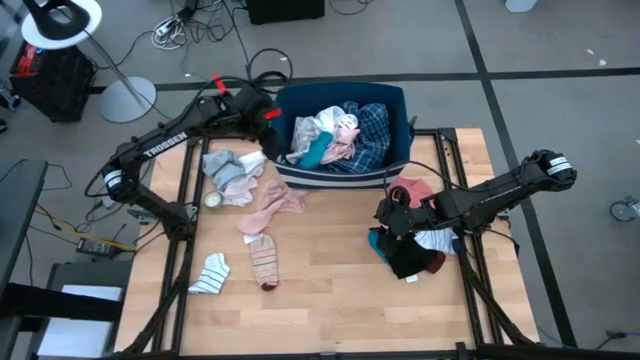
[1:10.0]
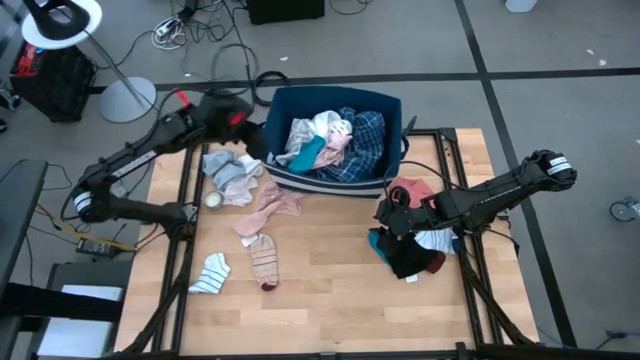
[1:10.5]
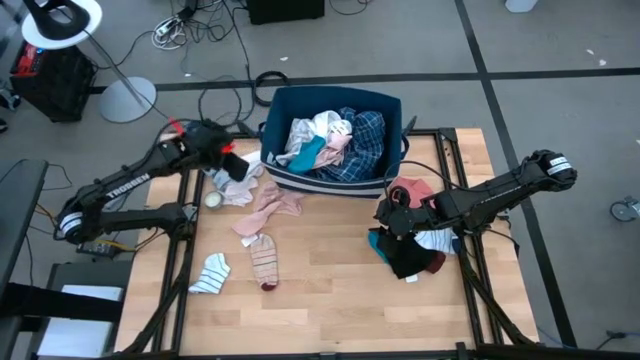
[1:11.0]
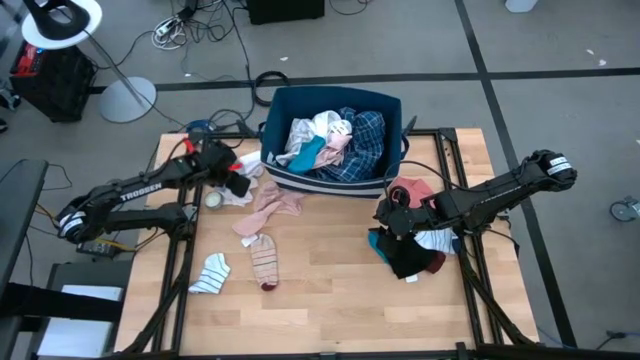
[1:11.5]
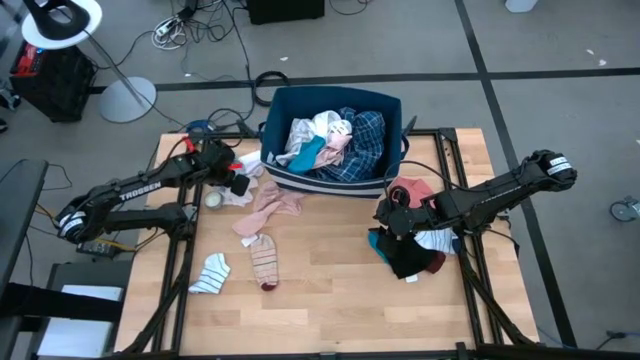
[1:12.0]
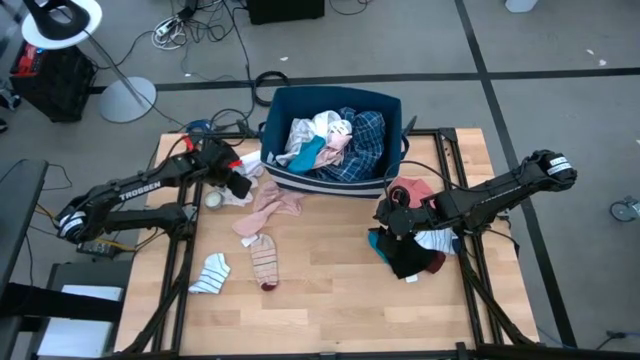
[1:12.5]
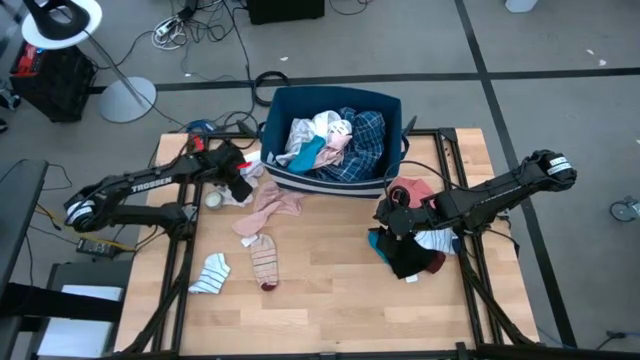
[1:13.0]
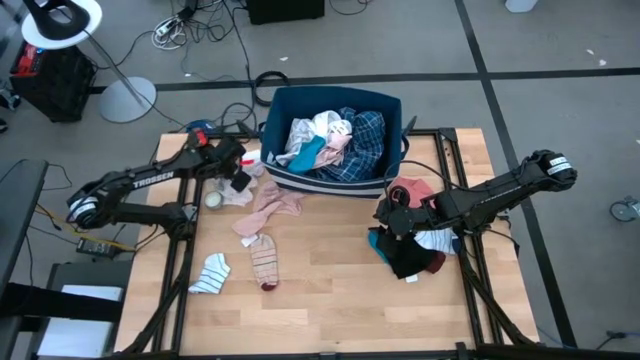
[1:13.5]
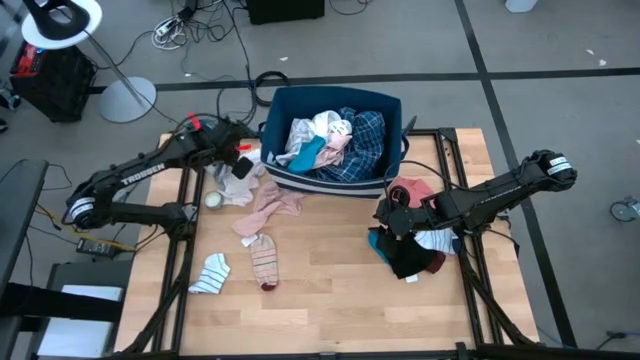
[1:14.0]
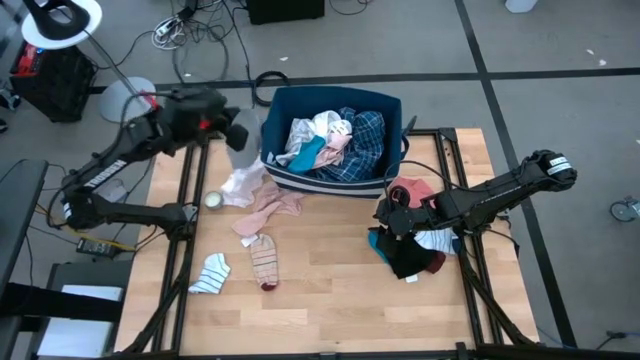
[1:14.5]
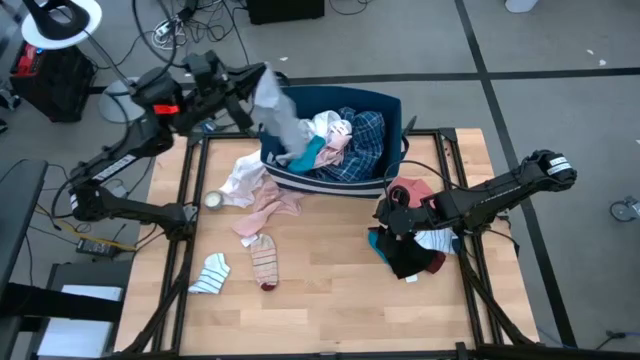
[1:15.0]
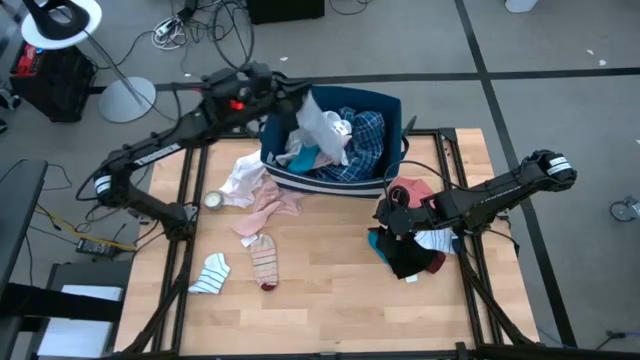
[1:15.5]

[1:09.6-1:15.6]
Task: Sort clothes
Put the gray boxer into the blue bin

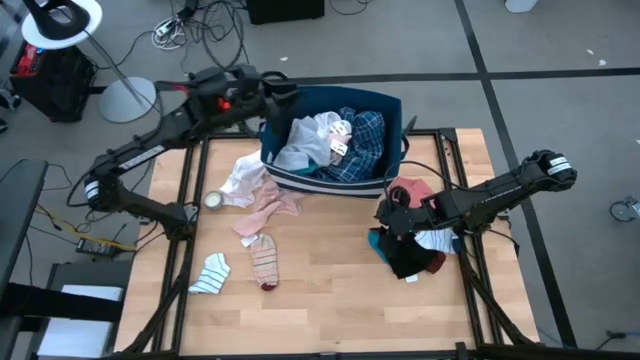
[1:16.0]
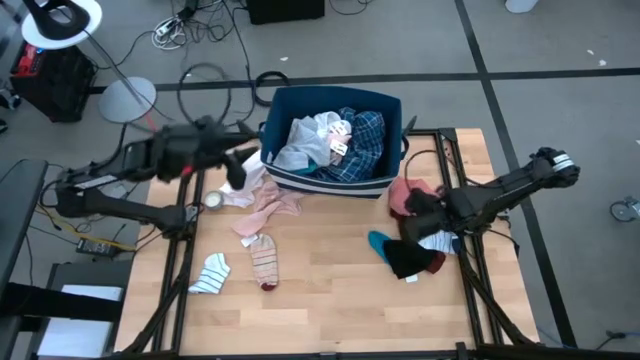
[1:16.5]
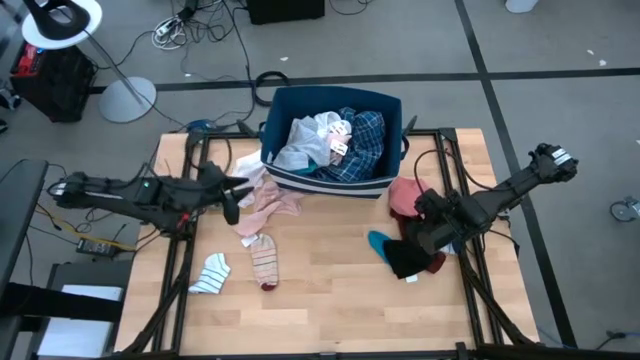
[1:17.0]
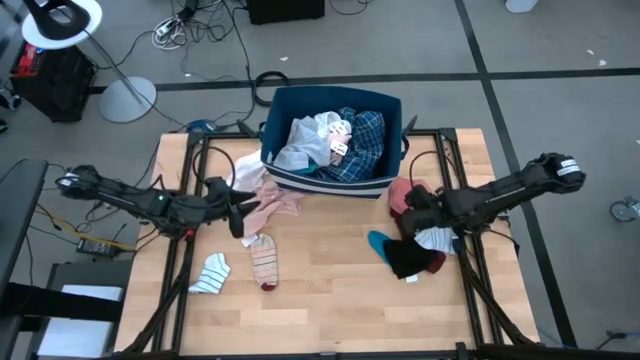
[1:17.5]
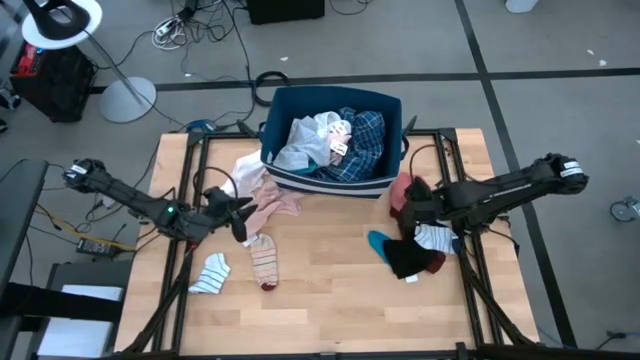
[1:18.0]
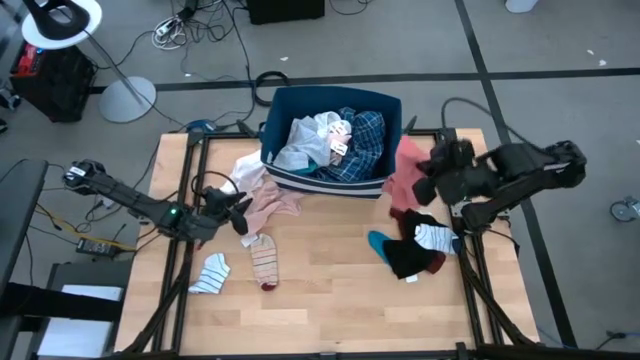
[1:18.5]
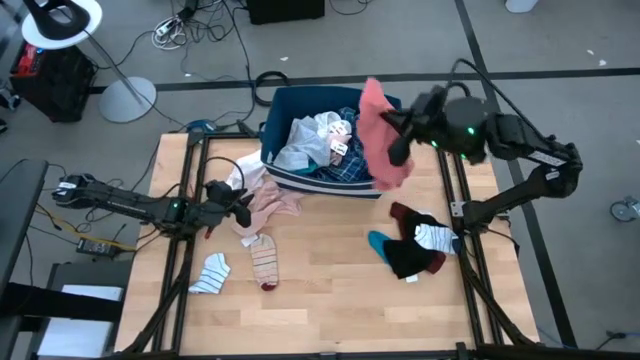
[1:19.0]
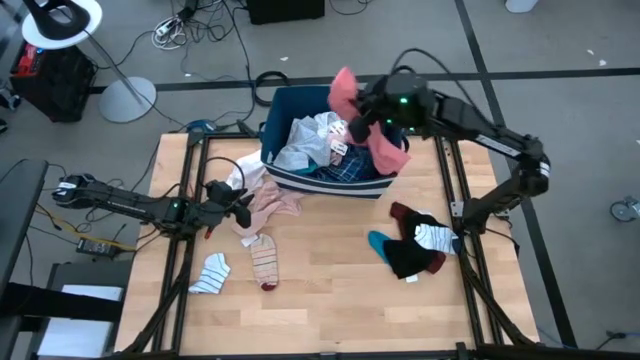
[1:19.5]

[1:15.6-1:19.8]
Put the pink boxer into the blue bin

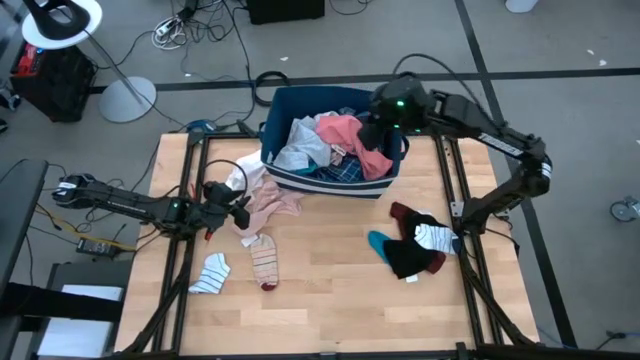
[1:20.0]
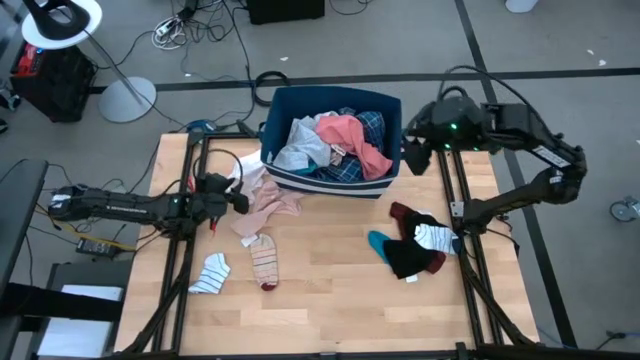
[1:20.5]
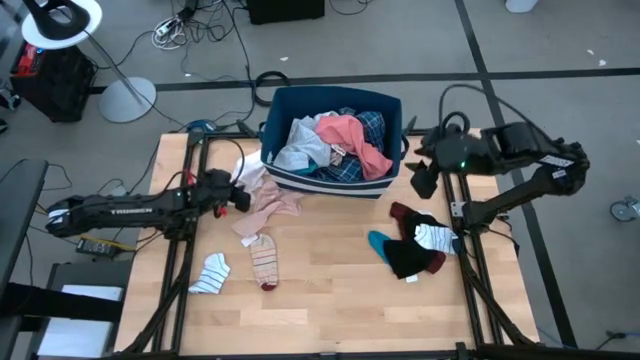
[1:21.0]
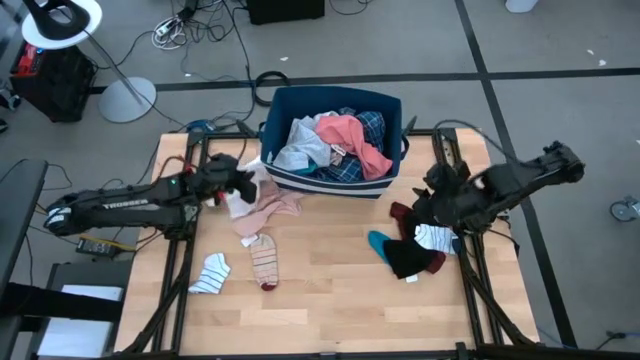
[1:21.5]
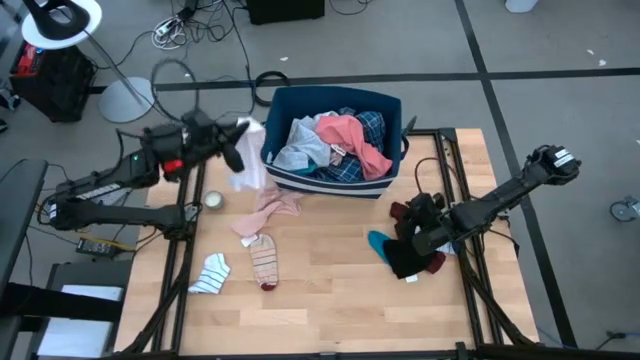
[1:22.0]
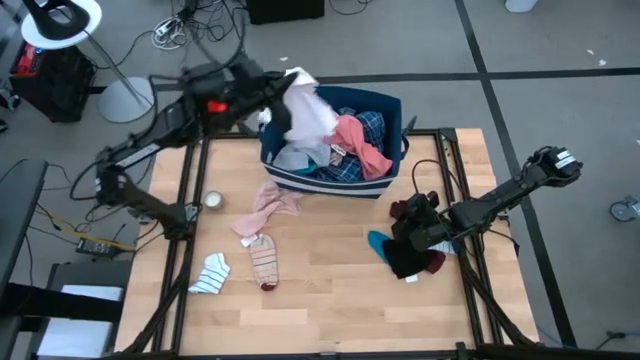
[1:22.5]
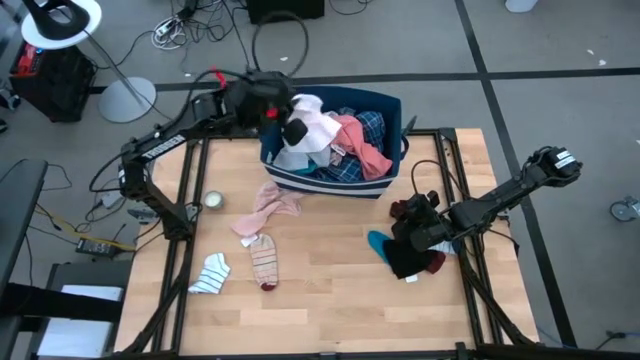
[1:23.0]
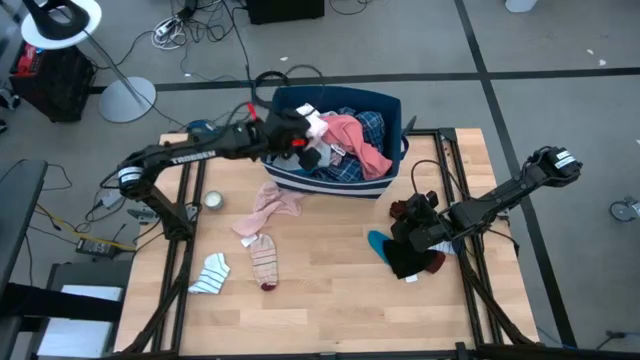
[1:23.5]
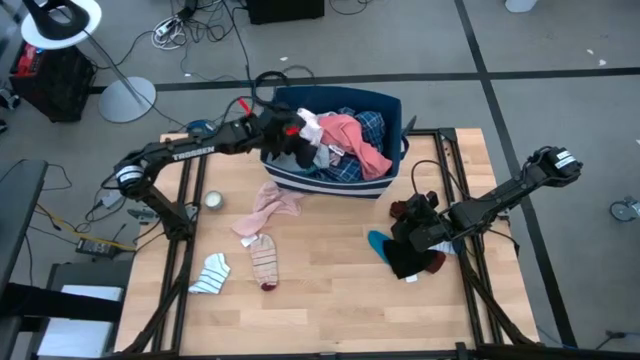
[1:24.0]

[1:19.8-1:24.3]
Put the white boxer into the blue bin

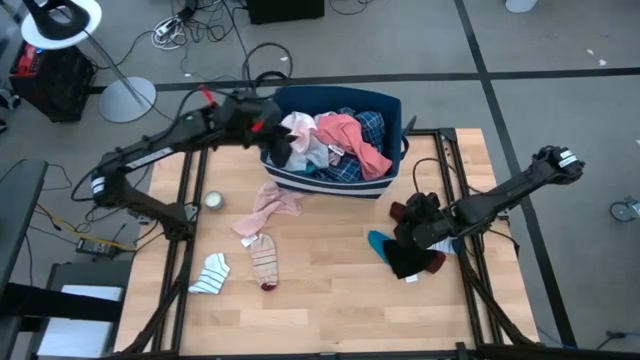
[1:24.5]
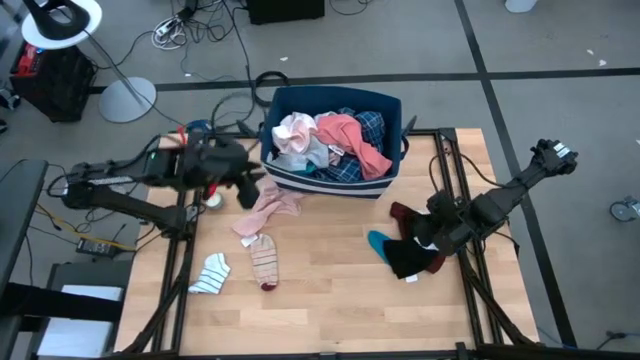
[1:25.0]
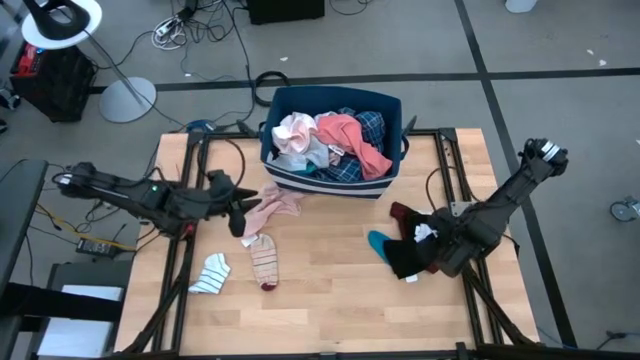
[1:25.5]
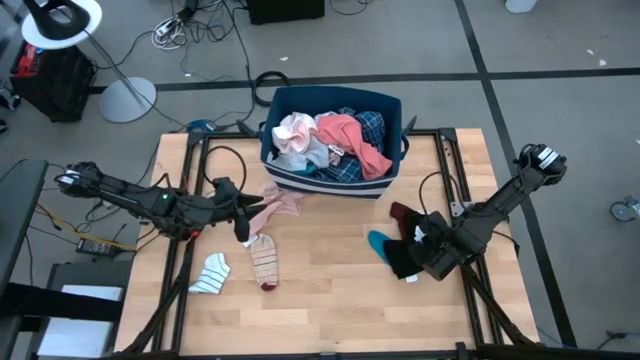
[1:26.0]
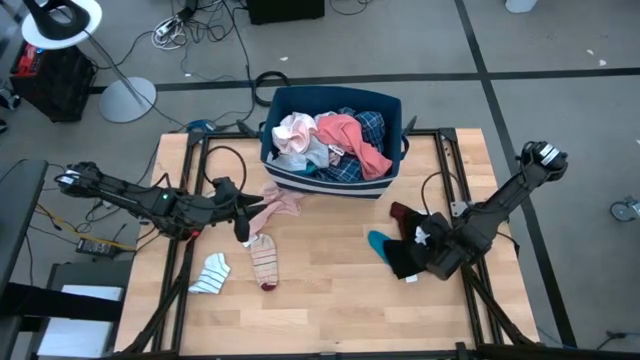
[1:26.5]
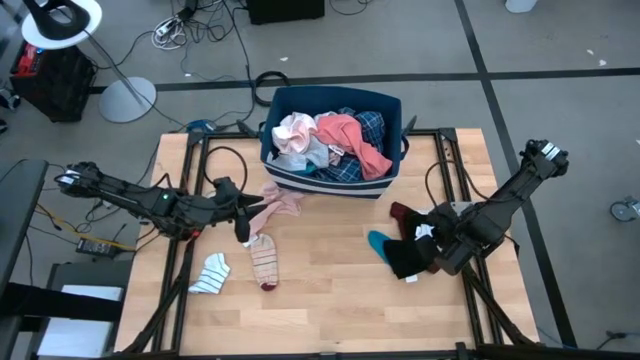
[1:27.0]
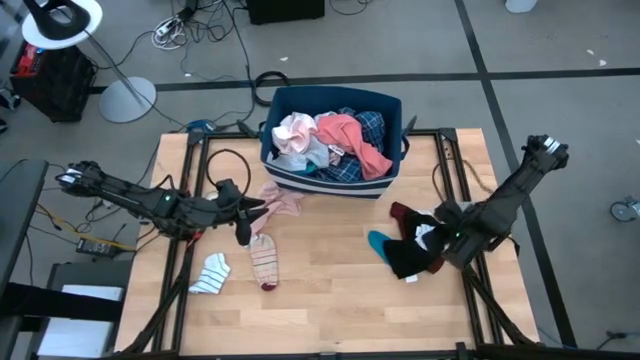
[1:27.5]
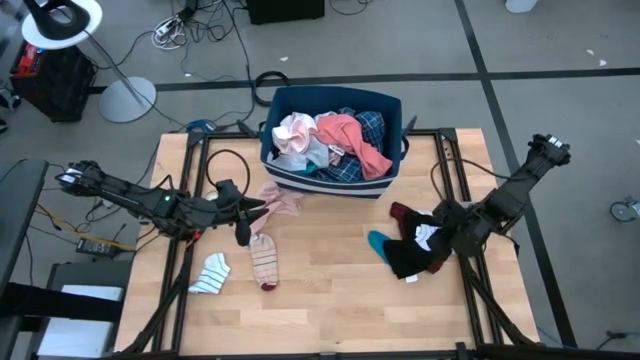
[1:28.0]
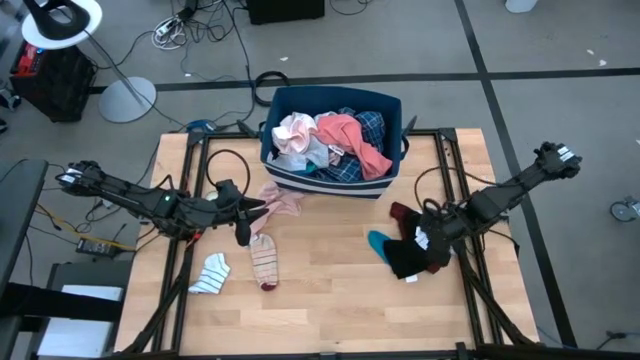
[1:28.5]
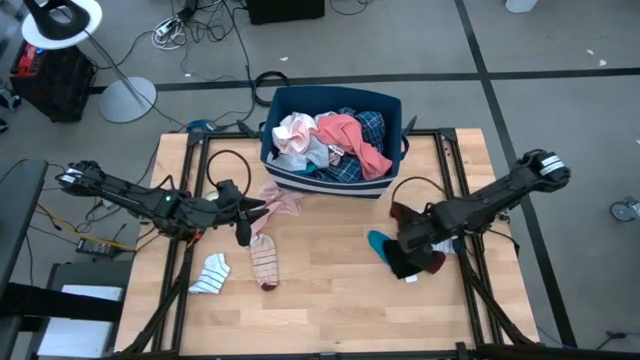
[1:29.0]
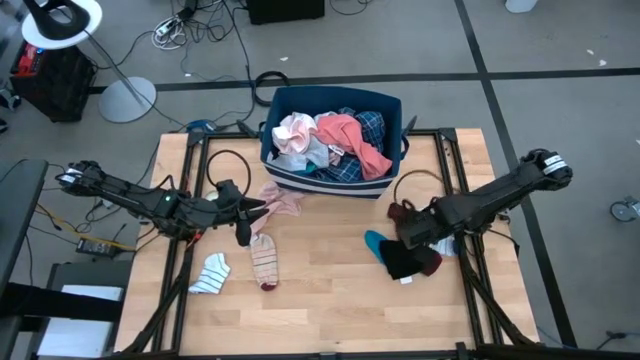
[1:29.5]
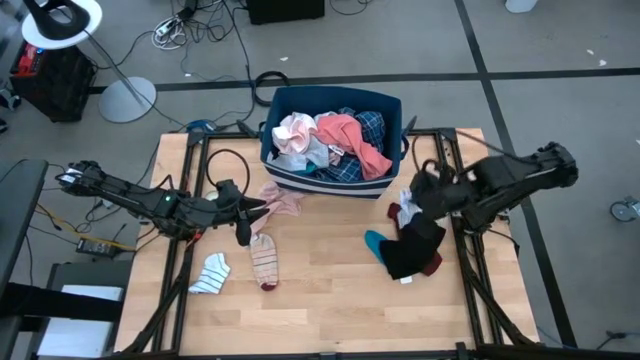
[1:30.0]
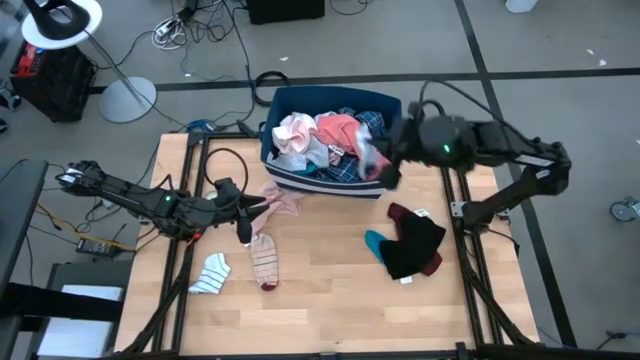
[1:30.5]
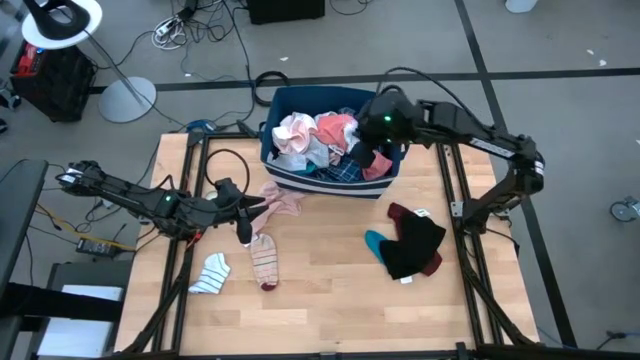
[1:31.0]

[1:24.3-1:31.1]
Put the right striped white sock into the blue bin
